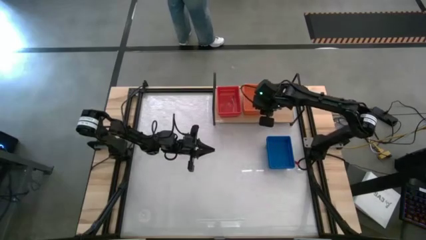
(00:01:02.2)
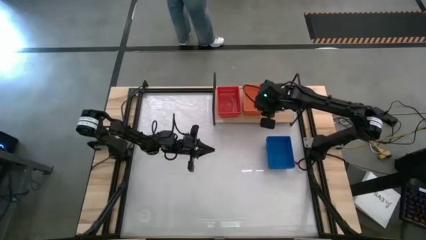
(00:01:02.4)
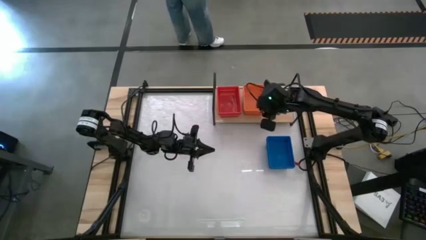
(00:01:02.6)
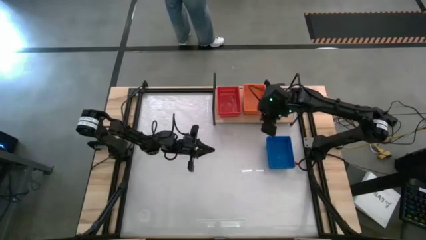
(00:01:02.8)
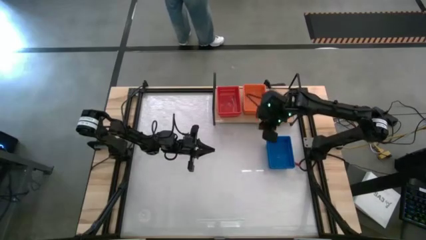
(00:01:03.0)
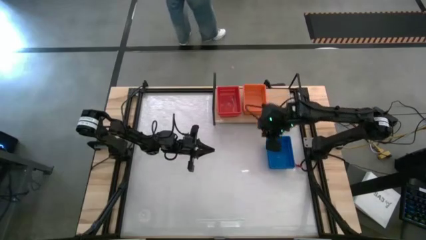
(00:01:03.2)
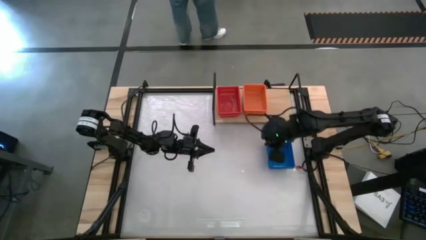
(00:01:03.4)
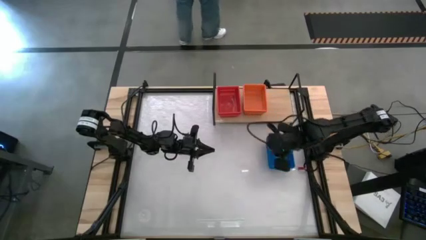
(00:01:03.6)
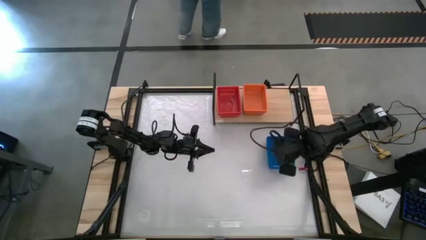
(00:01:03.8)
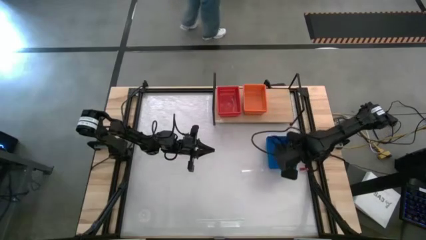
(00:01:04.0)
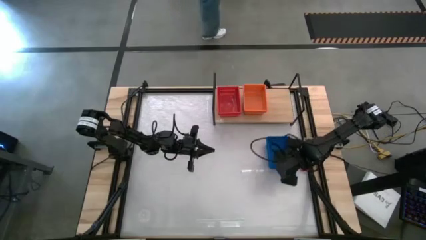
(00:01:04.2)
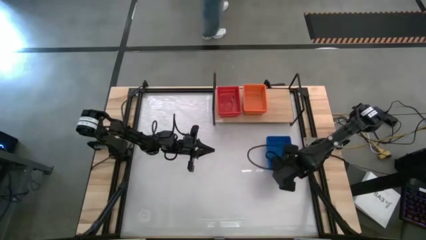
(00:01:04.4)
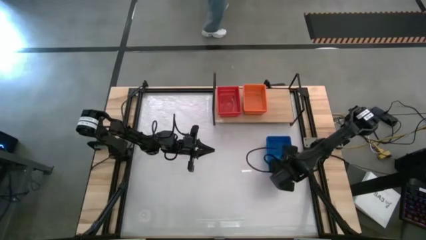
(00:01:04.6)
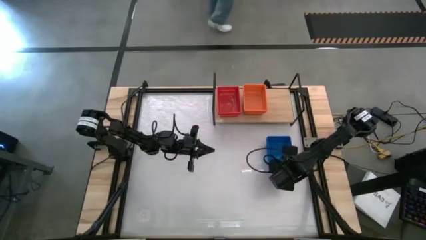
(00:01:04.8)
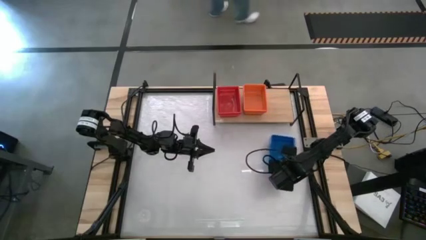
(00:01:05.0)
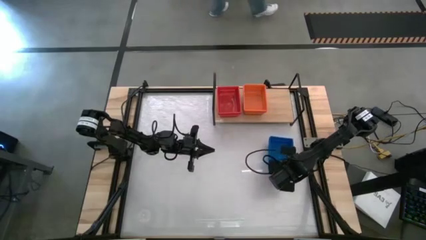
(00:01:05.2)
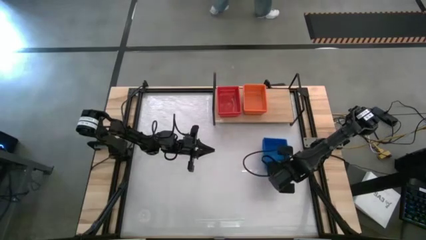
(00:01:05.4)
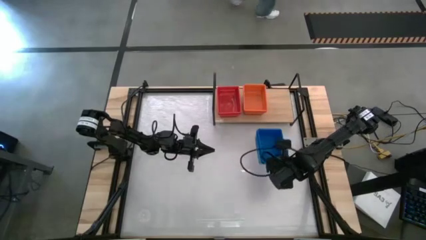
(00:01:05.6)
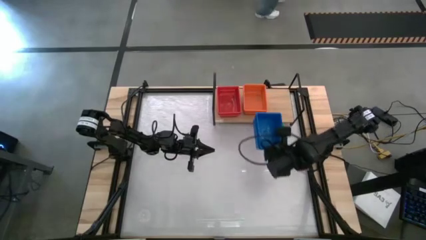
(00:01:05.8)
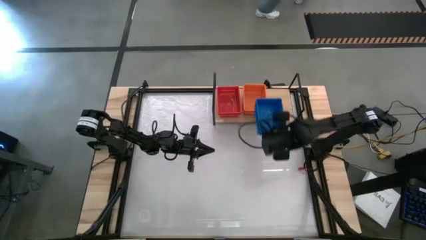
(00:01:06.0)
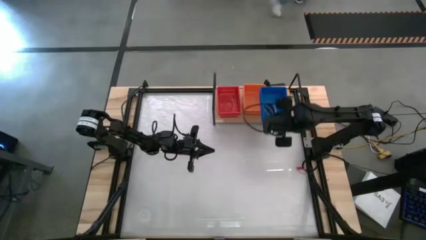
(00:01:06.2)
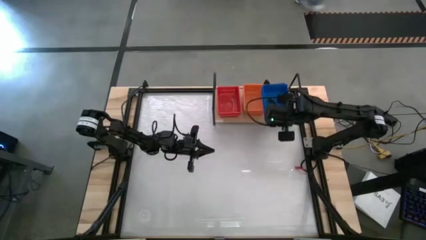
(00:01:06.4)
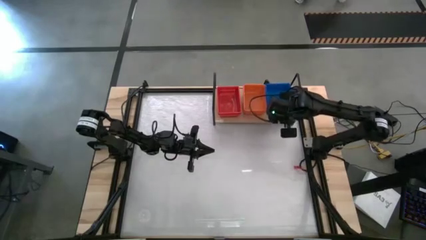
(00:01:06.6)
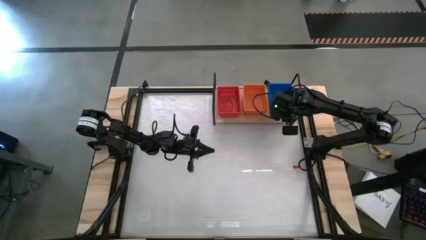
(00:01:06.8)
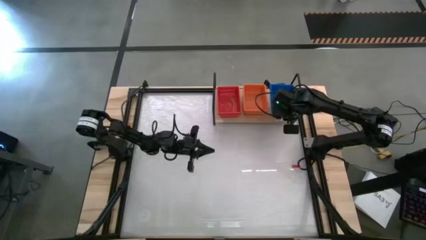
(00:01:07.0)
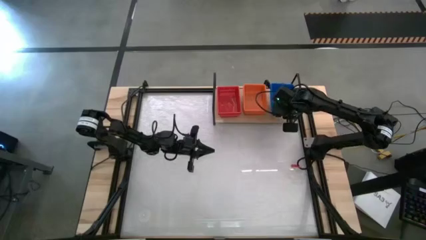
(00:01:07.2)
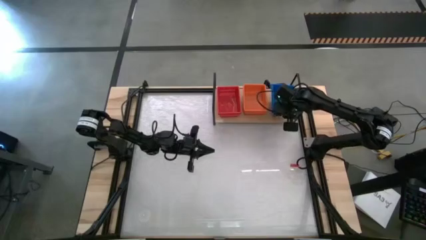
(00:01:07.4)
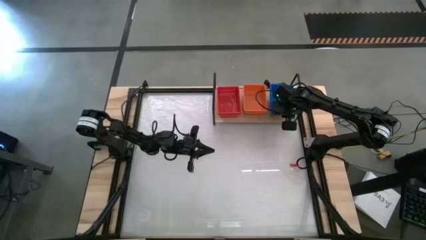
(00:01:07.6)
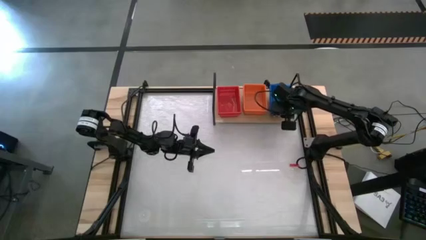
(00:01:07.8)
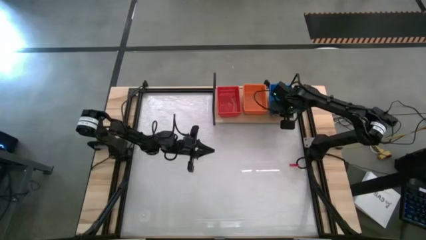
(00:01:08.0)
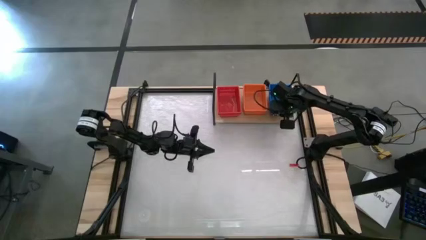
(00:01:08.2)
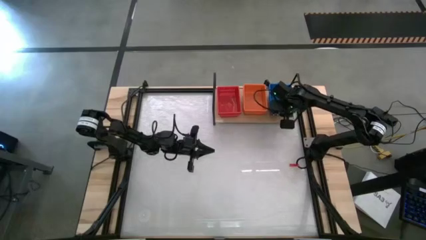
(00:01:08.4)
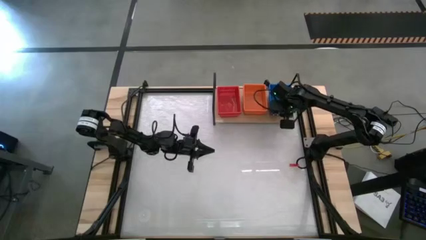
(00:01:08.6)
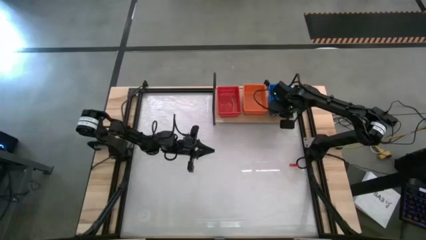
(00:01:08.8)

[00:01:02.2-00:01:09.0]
Task: Stack baskets on shelf by color
Put the stacked blue baskets on the shelf

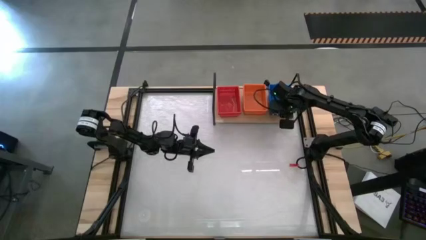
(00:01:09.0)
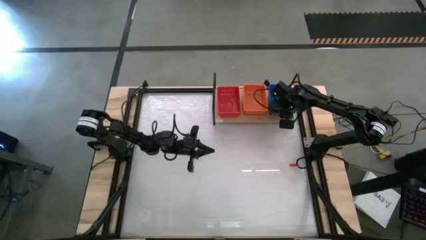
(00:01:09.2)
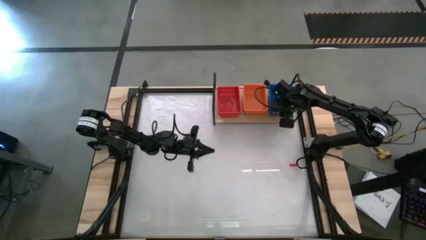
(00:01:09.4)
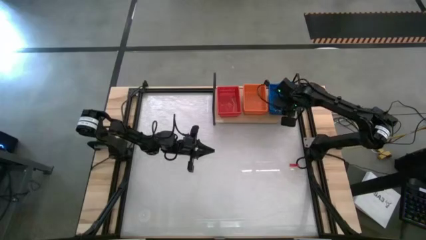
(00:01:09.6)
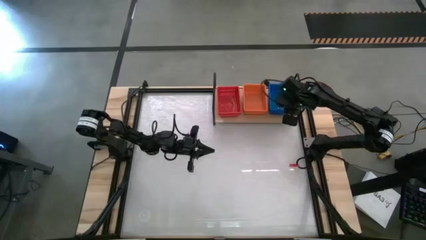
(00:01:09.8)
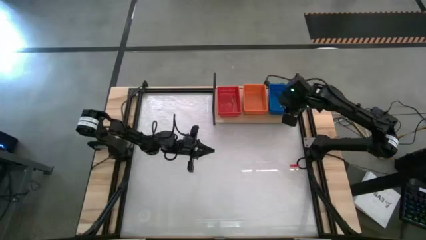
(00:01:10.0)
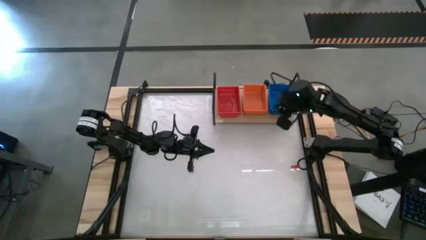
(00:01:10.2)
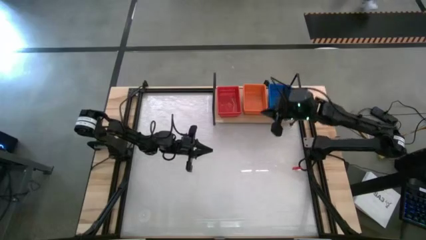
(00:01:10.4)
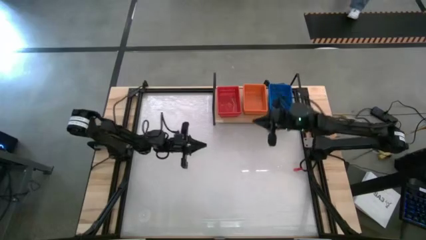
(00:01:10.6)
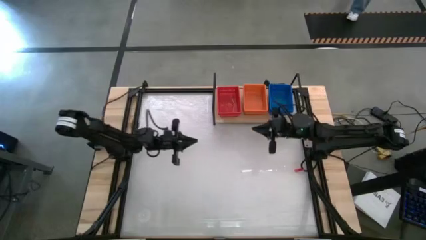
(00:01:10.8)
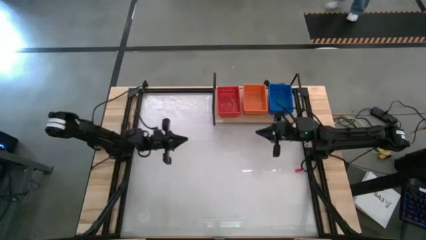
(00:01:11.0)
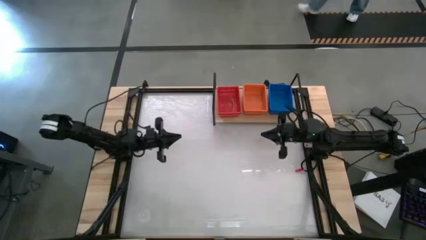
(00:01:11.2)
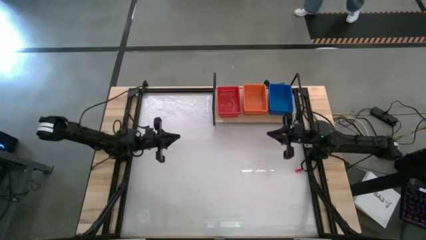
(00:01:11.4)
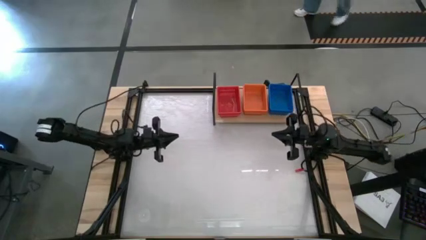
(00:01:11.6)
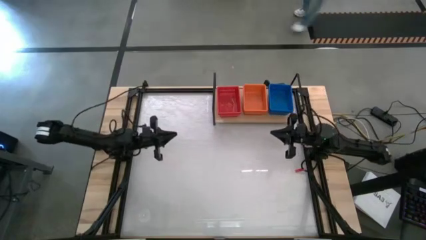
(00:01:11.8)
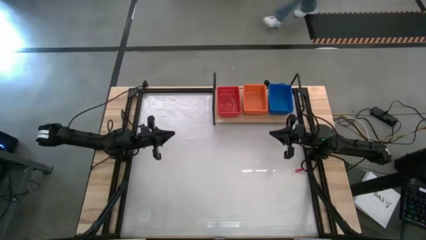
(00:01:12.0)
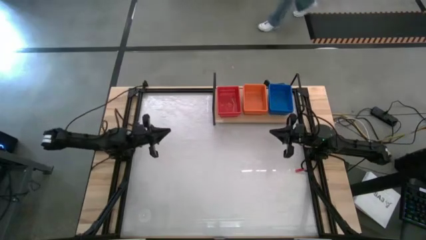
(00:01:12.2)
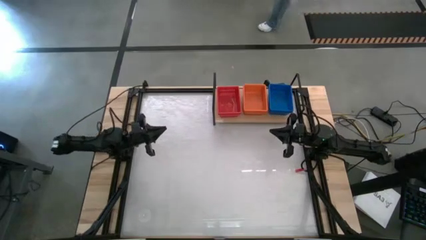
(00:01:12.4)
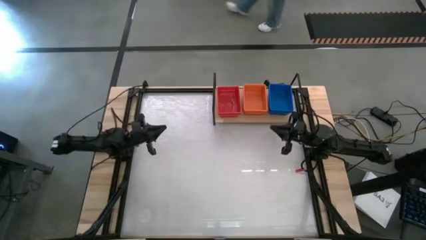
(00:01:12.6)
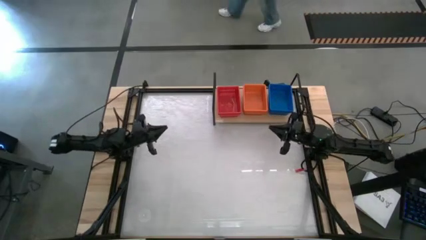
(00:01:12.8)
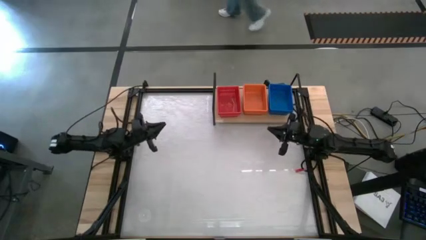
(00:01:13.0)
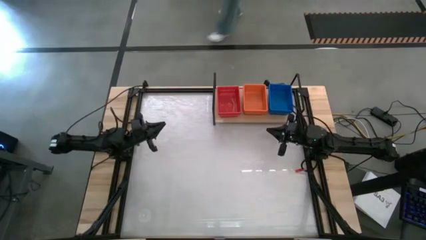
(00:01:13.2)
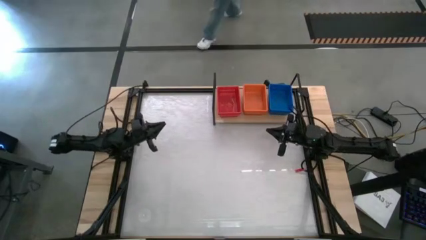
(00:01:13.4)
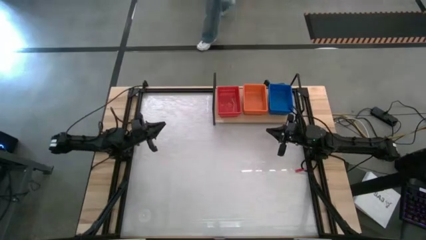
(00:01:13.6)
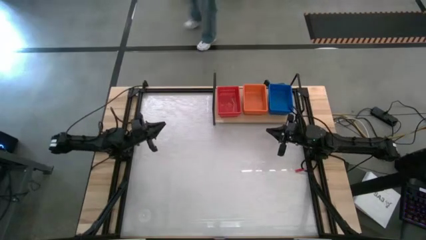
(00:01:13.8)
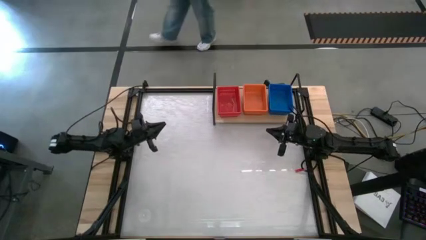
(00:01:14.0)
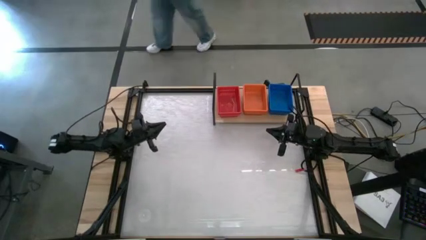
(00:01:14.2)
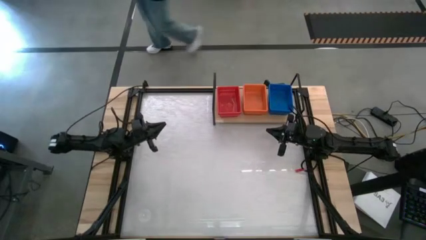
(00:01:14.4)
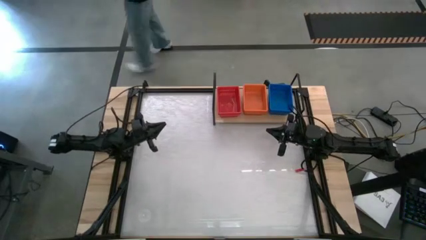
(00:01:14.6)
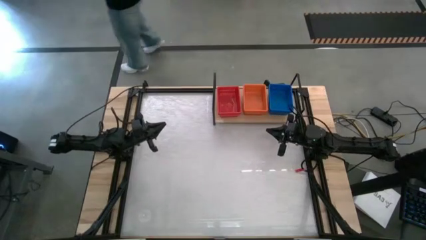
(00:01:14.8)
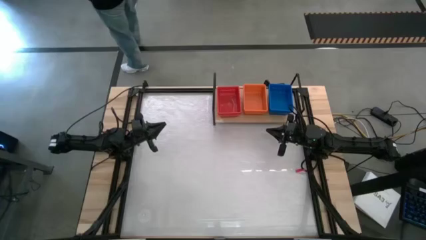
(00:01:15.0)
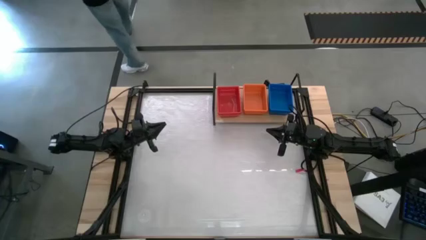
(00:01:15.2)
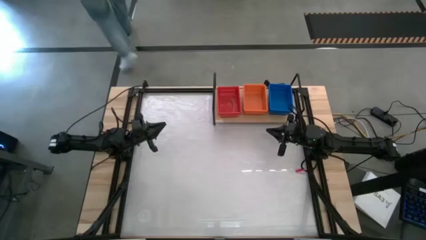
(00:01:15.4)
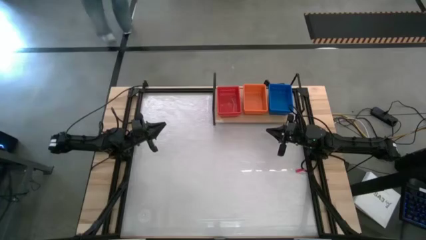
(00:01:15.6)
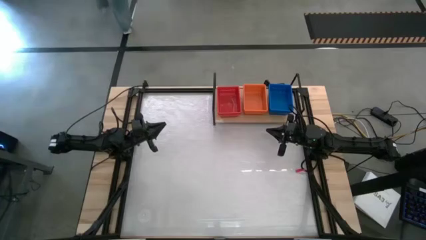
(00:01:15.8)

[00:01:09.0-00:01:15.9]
Return to Home Position

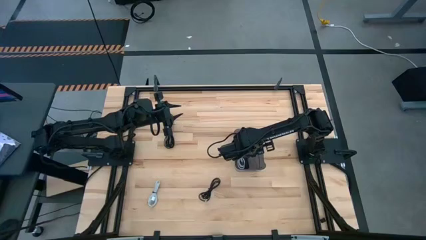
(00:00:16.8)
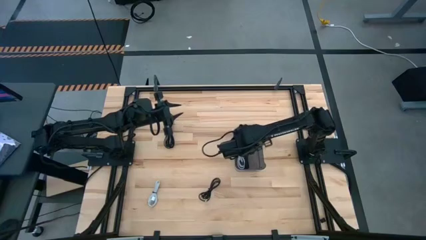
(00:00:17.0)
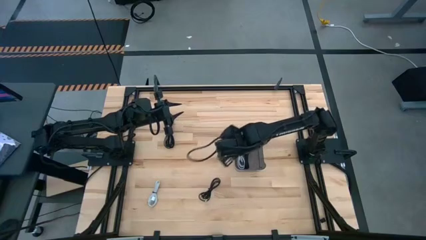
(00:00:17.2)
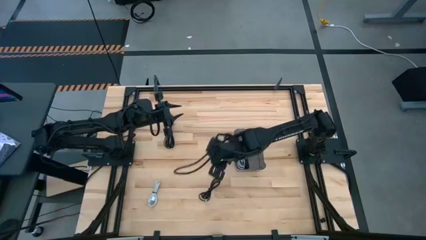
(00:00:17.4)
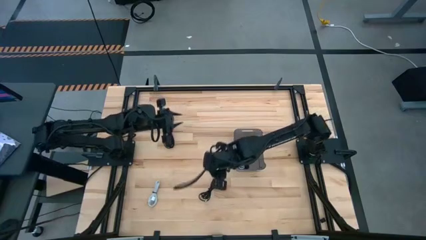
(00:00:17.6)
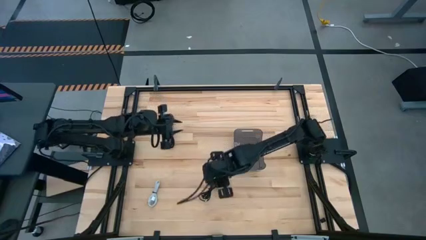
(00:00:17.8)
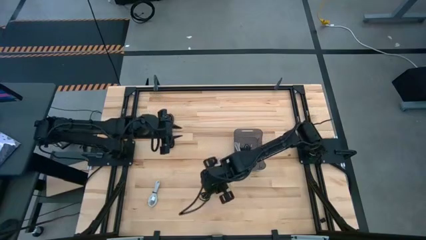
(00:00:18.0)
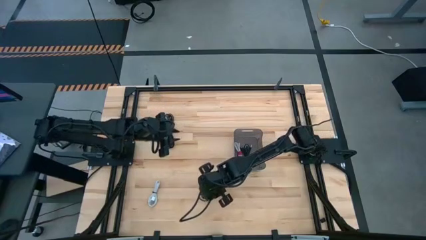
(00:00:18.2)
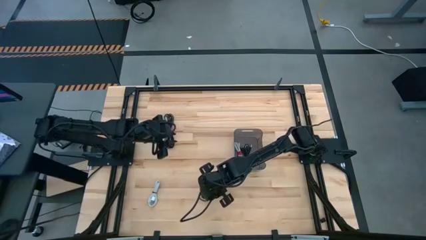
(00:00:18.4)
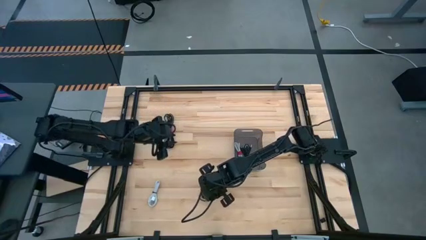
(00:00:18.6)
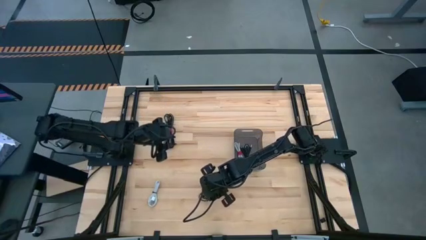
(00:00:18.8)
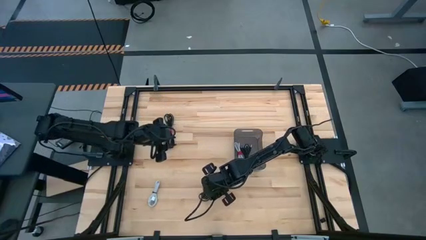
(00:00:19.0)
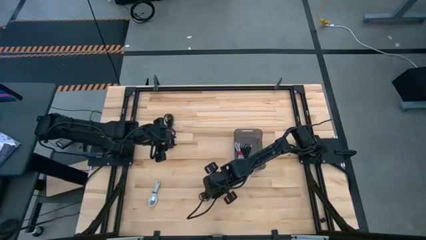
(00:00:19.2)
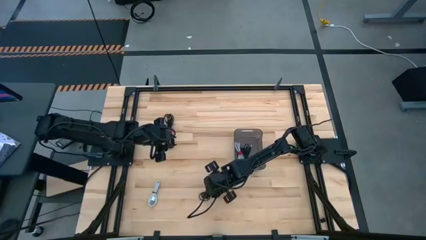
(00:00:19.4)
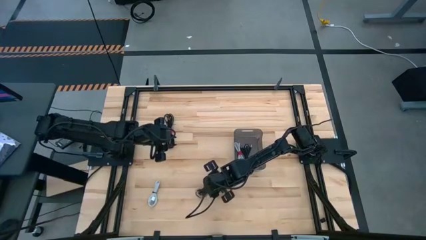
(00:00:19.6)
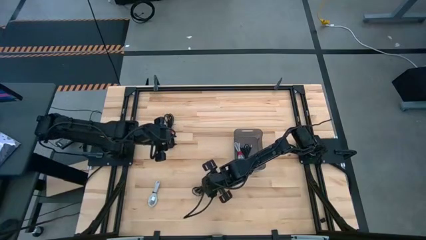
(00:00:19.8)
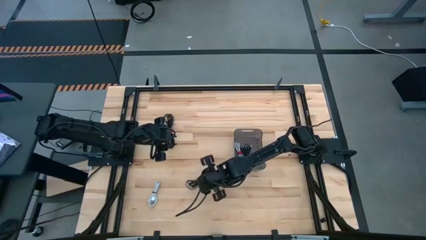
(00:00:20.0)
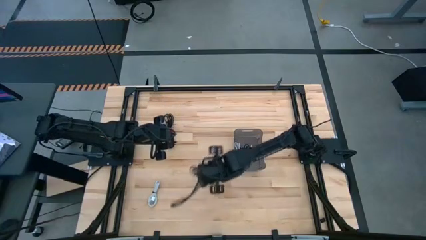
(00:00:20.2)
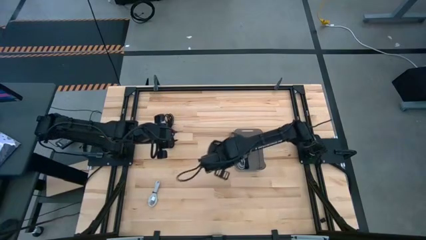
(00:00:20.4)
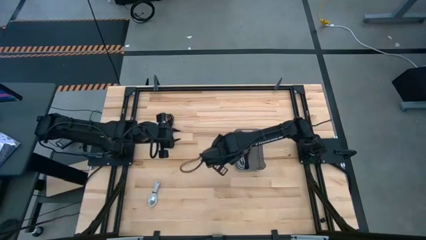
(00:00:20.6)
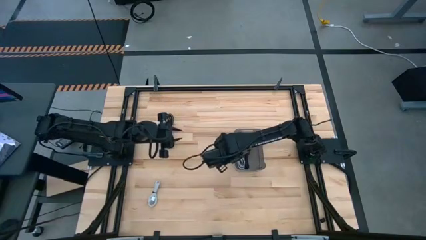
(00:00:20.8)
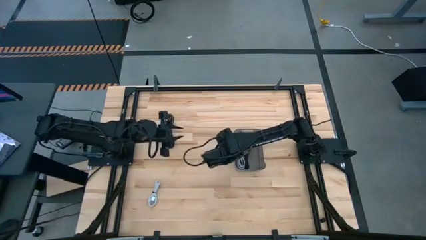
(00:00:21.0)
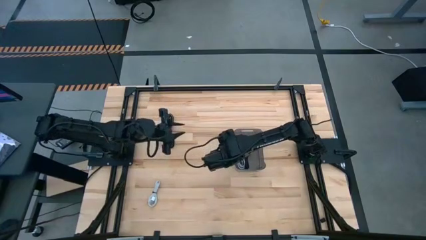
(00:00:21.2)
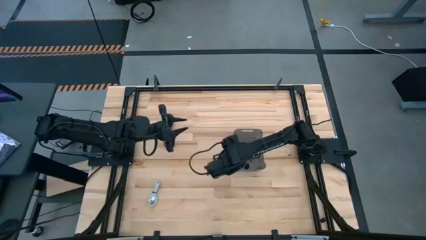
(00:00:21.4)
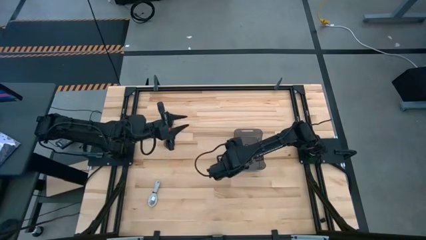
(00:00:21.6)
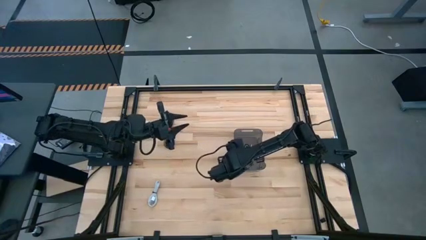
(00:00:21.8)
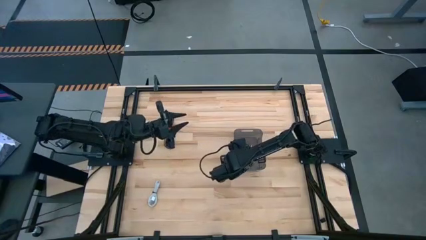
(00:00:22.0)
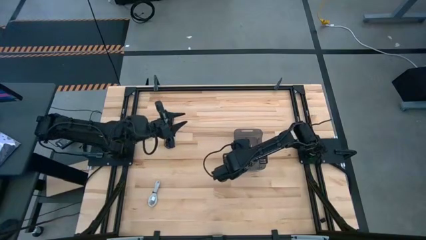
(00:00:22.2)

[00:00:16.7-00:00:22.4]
Task: Pick and place USB-C Cables
Put the bottom black charger cable into the black bin
